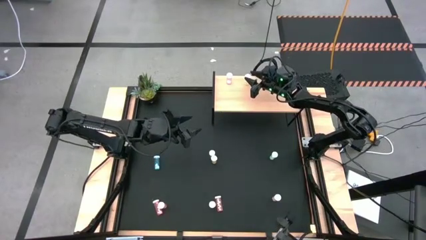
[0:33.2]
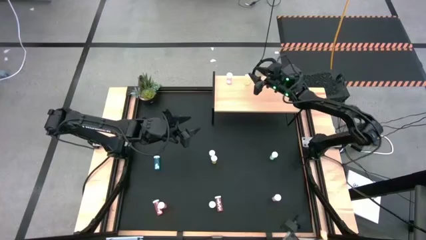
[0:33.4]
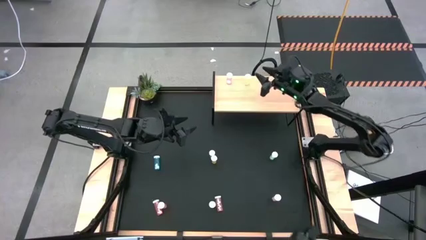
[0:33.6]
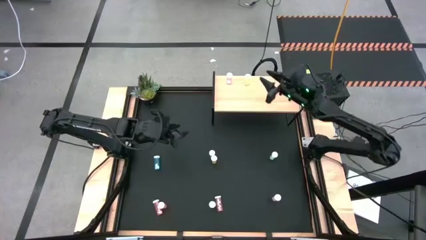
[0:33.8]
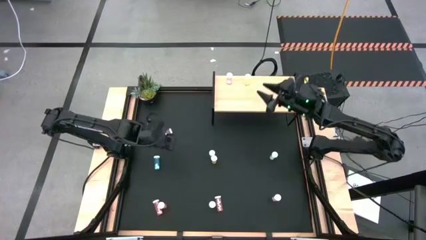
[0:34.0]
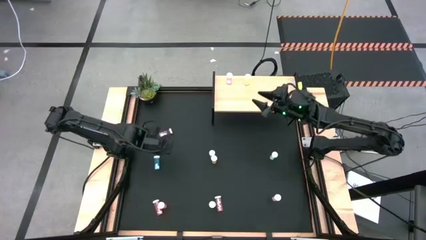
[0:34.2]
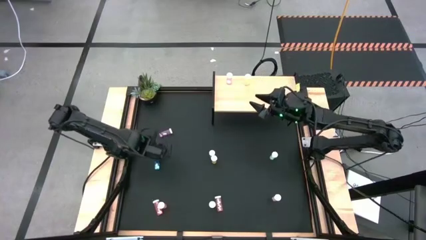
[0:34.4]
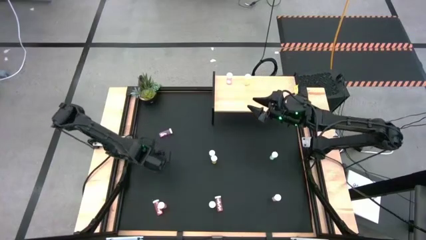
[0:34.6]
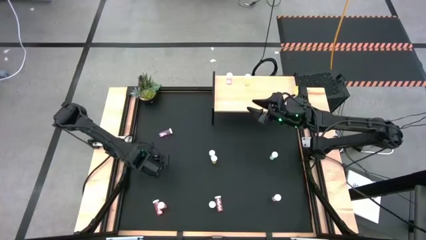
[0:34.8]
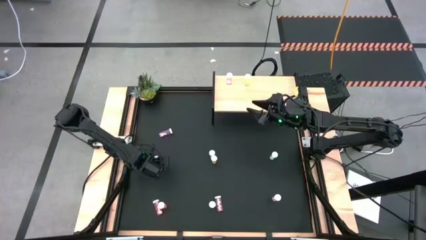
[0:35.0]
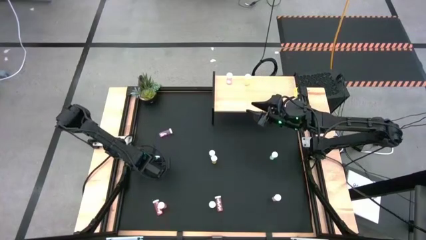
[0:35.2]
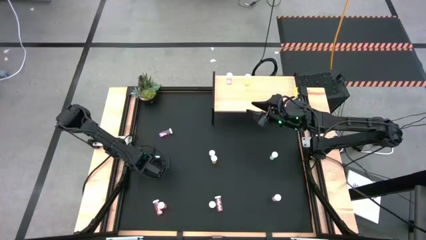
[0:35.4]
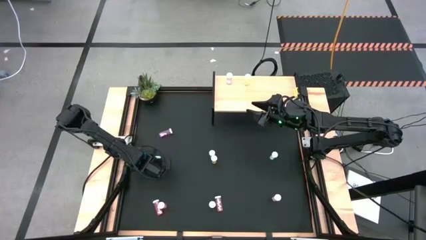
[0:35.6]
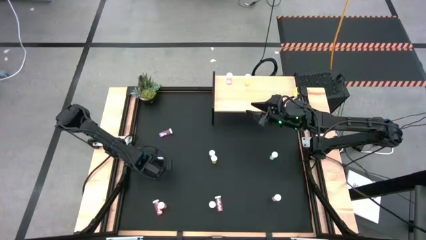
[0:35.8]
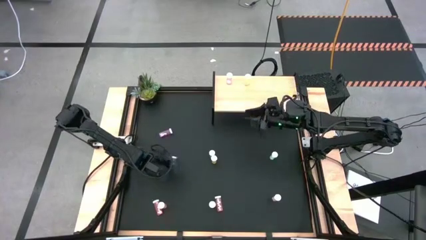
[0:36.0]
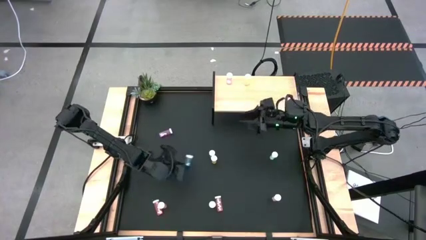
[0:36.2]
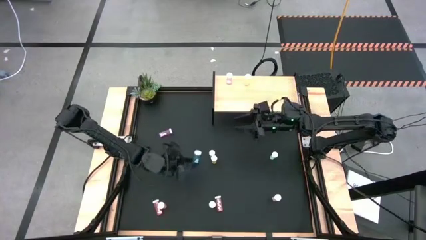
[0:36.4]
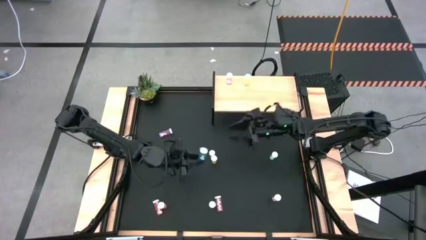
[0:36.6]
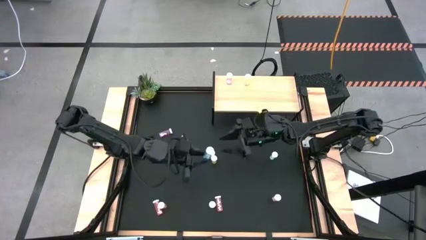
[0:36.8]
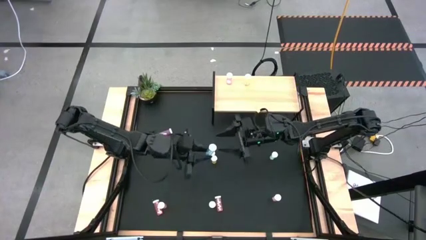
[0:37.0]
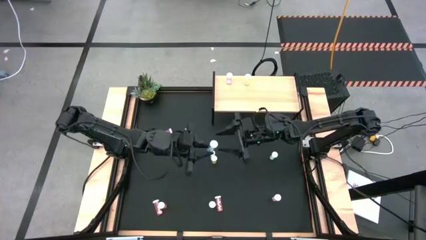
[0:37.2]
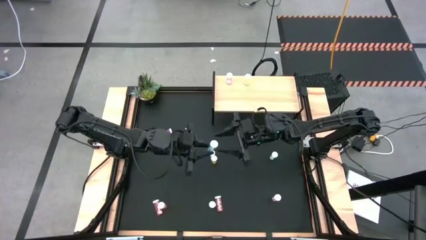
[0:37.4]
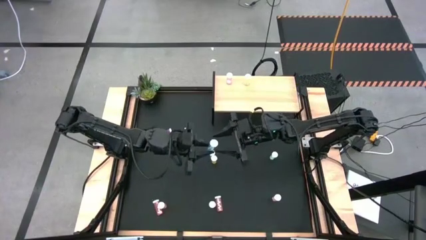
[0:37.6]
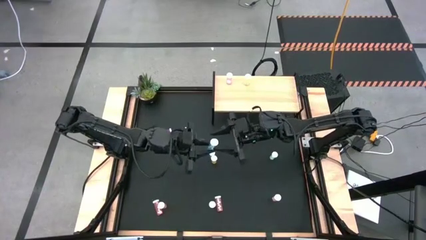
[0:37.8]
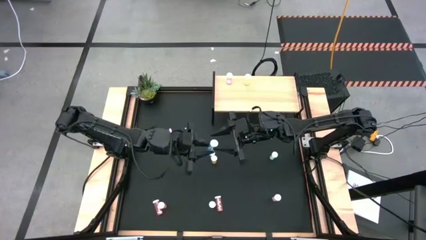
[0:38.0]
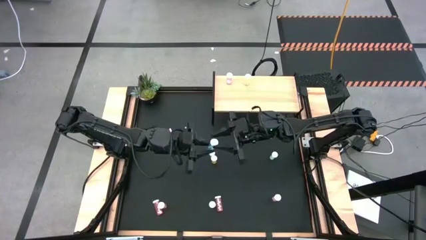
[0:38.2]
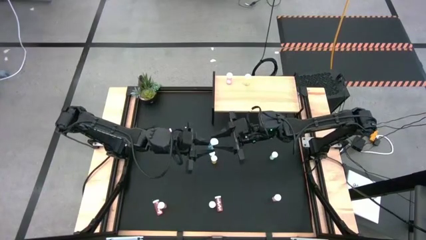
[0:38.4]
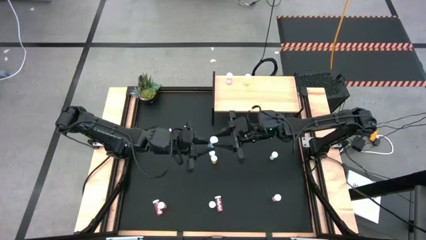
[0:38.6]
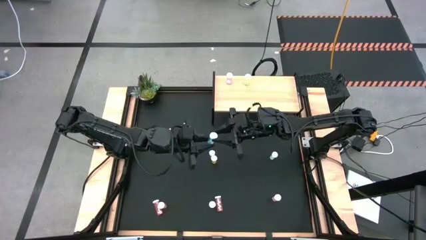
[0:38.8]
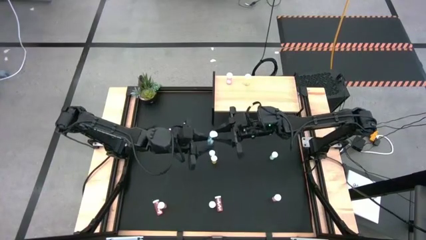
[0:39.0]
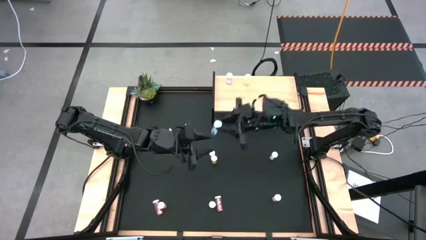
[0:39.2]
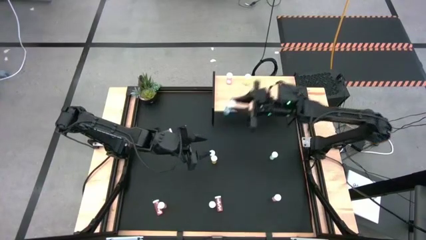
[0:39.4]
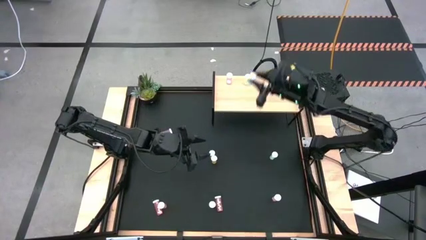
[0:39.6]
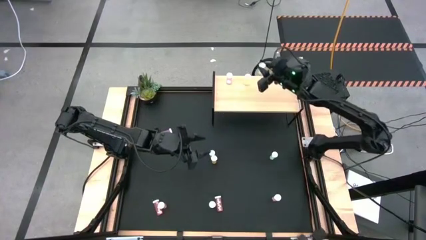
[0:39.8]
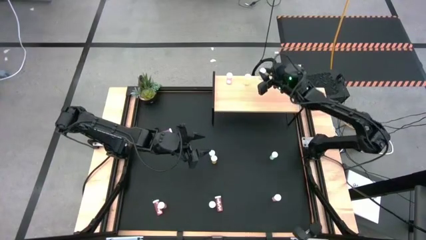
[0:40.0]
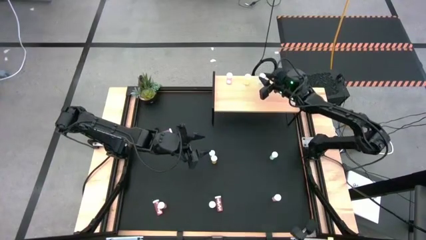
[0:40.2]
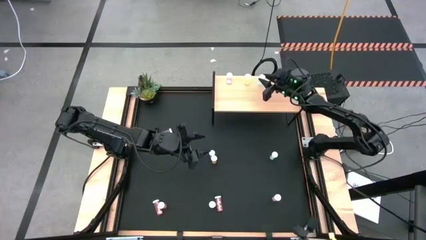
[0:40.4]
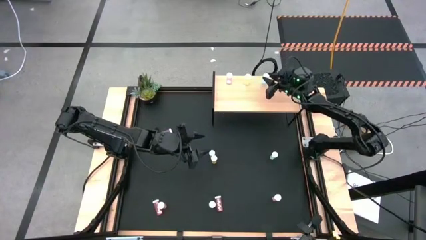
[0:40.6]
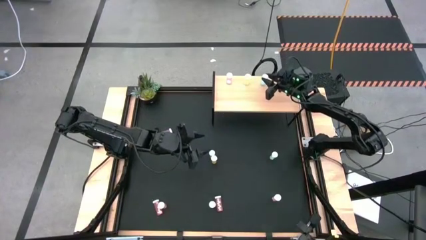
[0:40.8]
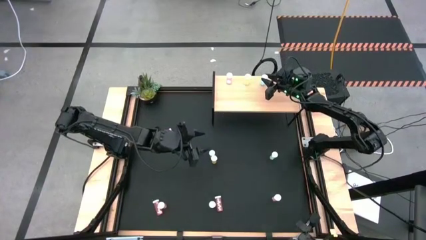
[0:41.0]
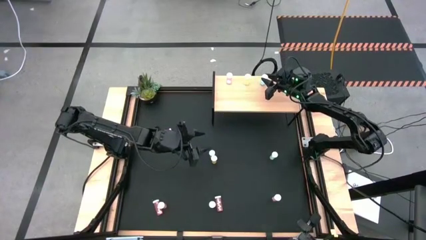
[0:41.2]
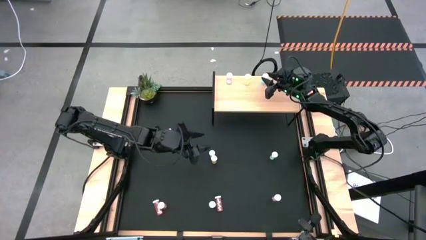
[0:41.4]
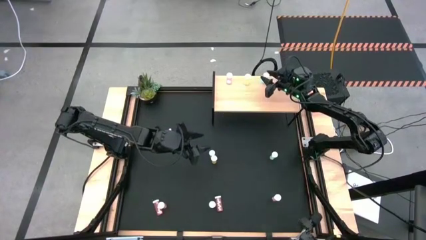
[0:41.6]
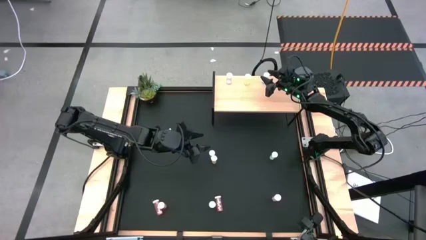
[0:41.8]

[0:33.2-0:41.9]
Task: Pick and place medicine bottles onto shelf by color
Put the left blue pill bottle on the shelf

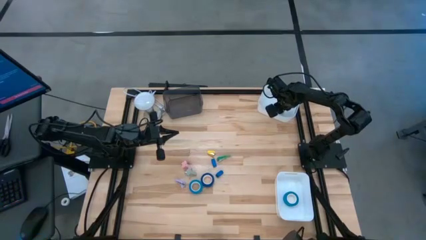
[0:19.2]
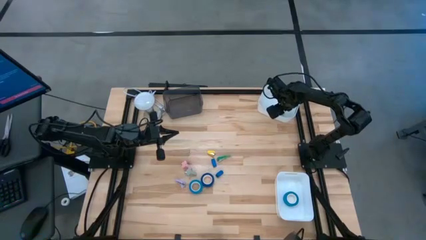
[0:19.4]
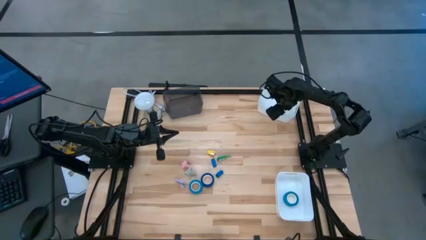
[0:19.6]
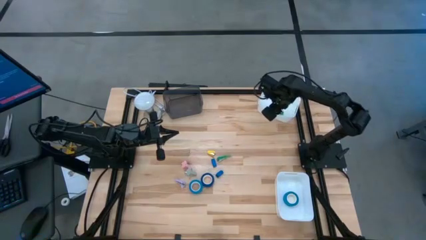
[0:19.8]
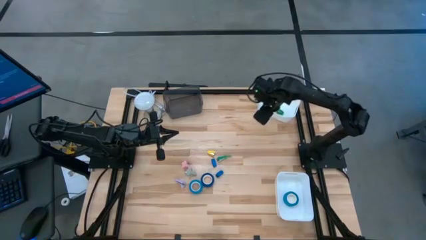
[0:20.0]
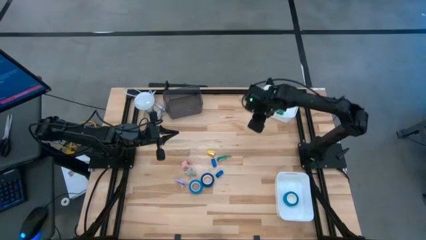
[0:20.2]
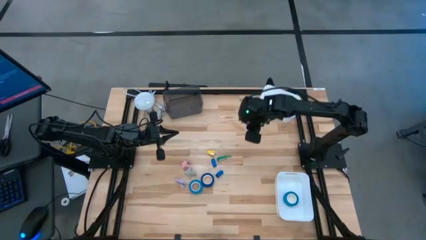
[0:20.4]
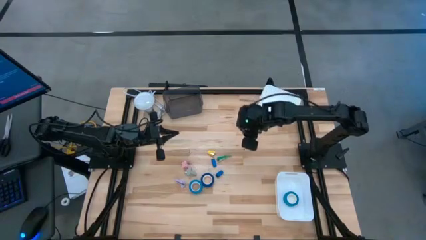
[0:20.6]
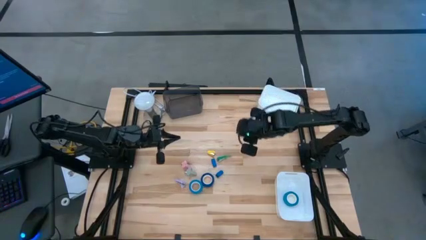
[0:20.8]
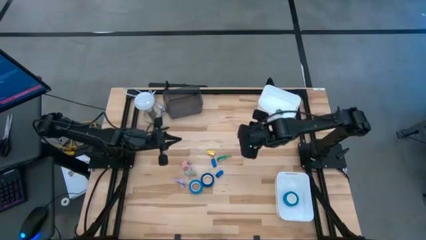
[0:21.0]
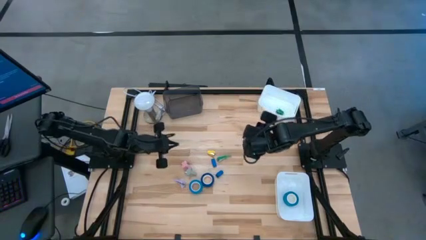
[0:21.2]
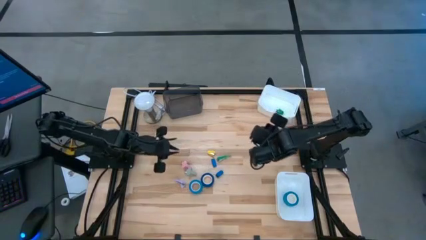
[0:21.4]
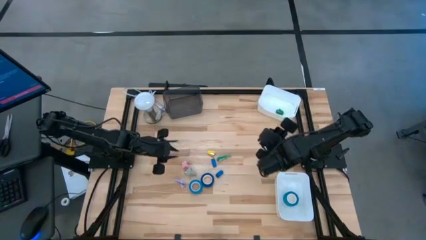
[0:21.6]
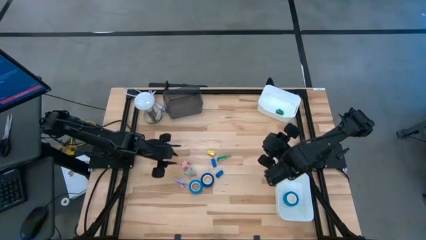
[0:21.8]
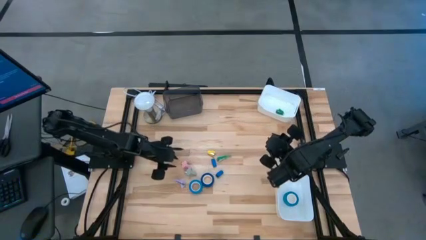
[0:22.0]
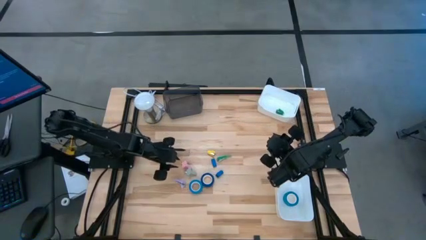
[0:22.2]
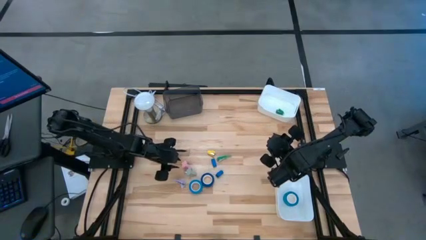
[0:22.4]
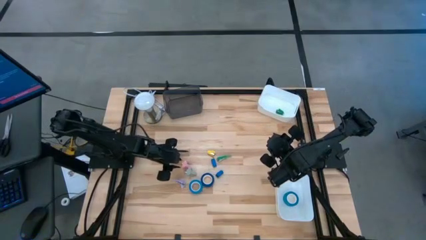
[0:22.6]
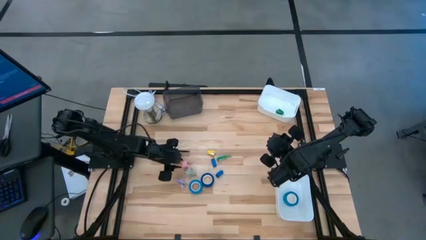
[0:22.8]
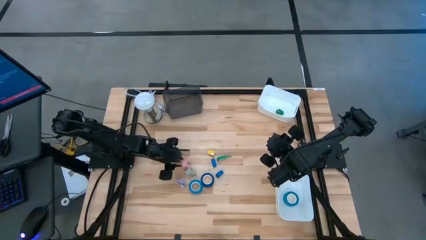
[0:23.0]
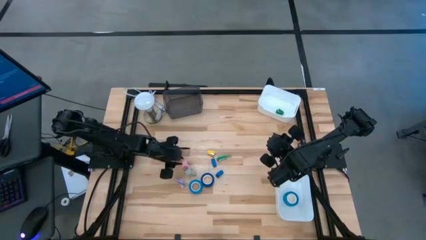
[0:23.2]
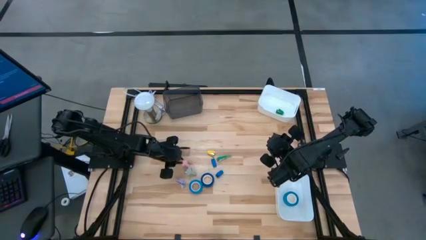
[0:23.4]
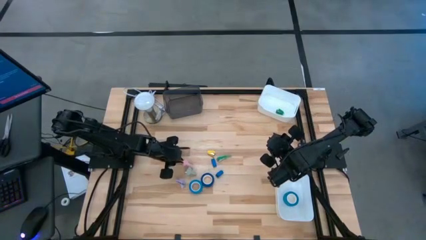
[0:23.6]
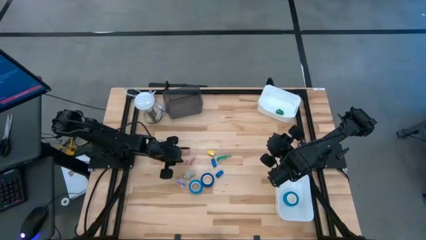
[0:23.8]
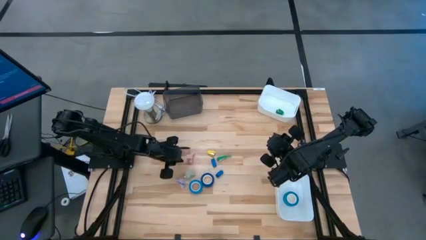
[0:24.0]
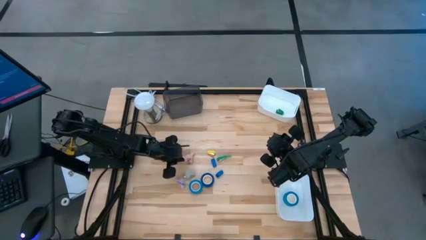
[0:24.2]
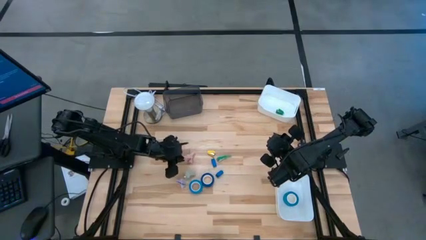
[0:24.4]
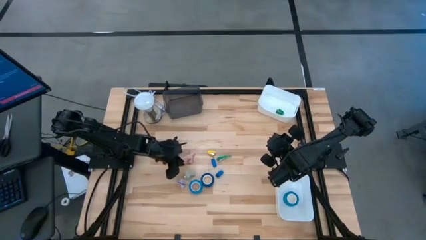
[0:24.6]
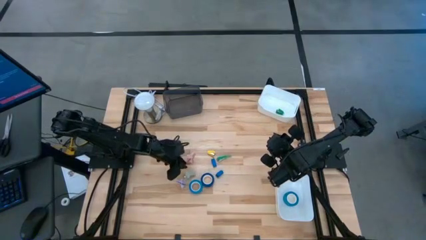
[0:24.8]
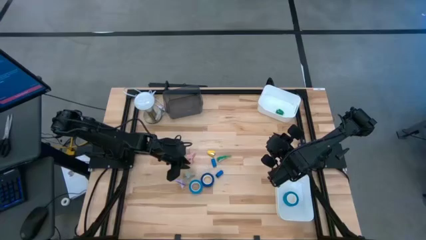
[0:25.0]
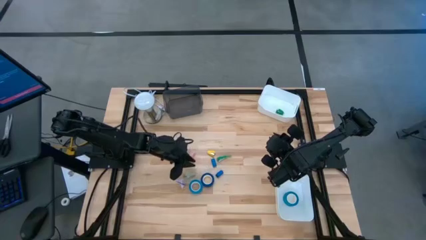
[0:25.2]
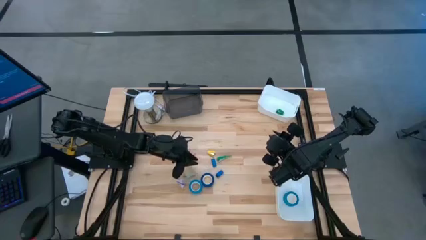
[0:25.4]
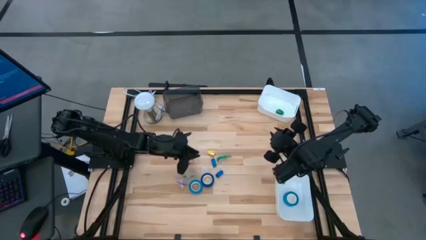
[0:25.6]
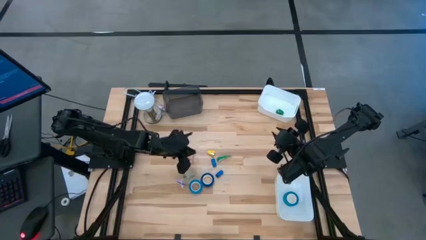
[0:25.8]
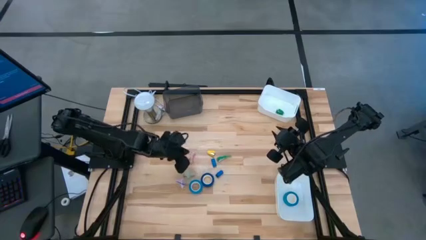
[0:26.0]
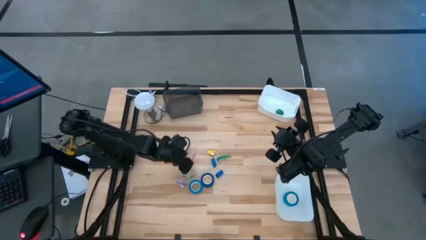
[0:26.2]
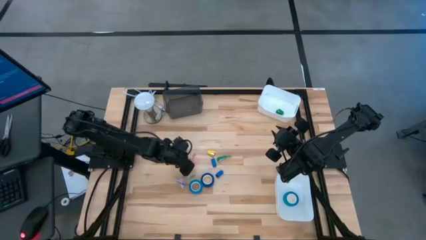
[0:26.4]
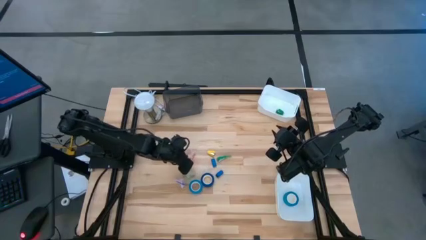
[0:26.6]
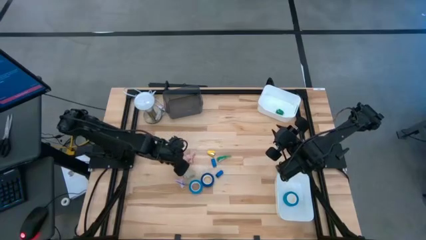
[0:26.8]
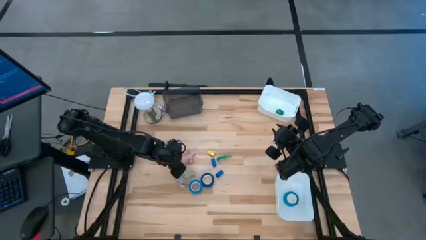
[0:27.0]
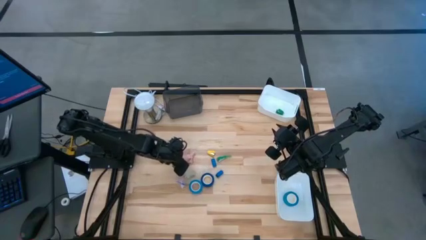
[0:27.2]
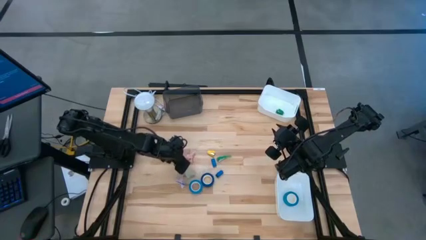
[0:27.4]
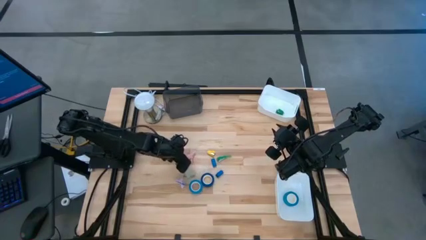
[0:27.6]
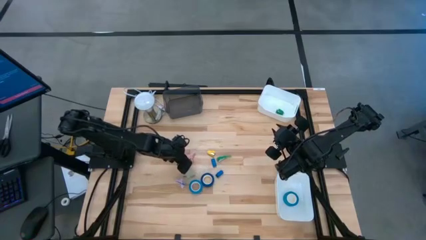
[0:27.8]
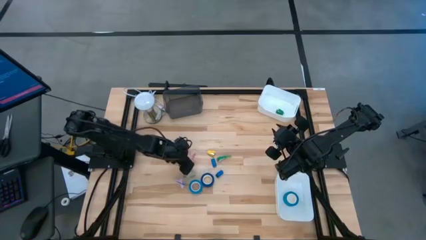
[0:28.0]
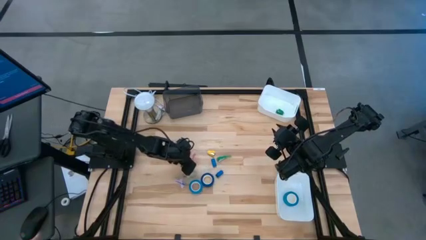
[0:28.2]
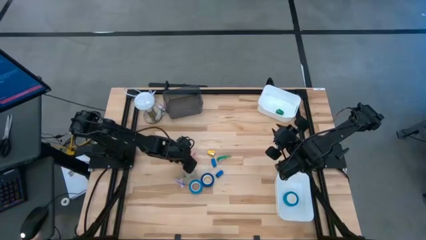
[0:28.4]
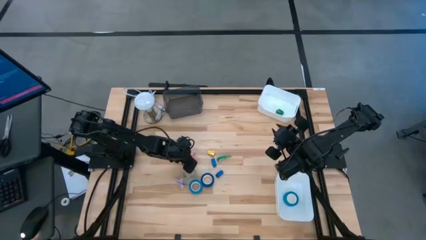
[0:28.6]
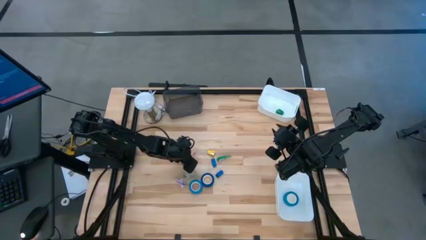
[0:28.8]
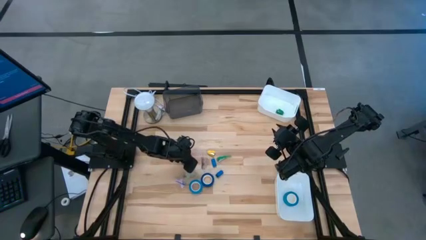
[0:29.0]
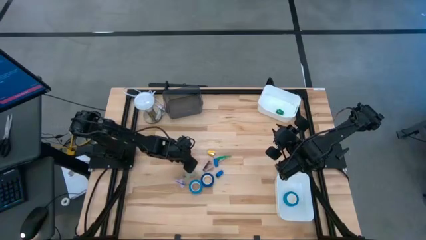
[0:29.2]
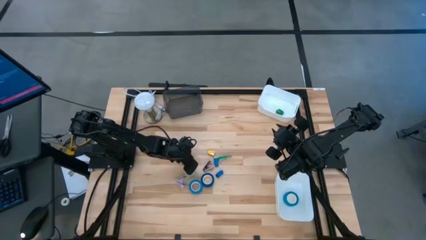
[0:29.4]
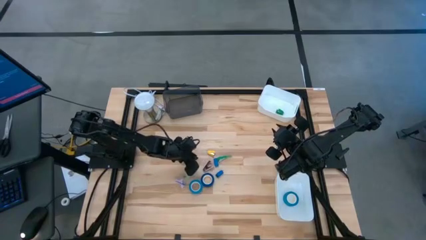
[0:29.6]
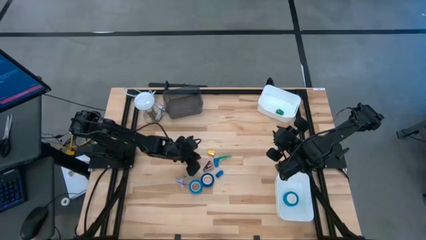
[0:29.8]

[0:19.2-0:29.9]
Task: Pick and place Stapler, Stapler remover, tape
Put the pink staple remover into the black bin
